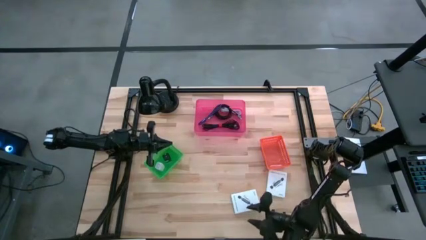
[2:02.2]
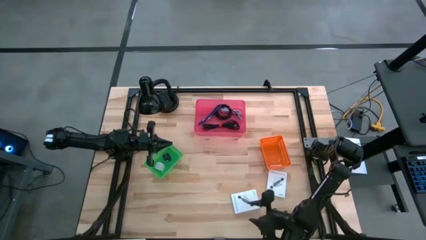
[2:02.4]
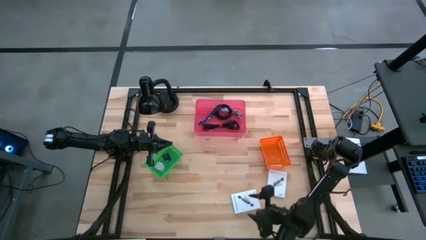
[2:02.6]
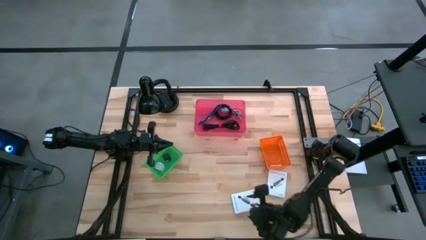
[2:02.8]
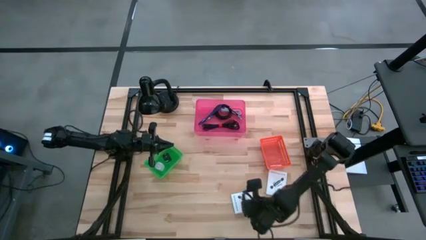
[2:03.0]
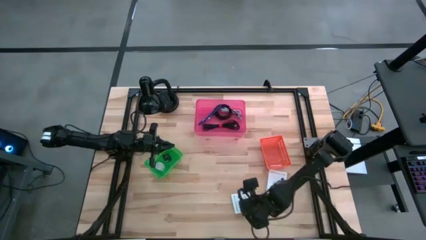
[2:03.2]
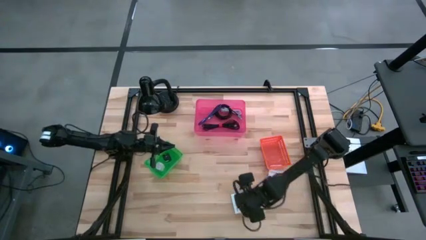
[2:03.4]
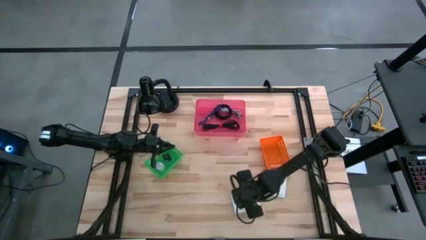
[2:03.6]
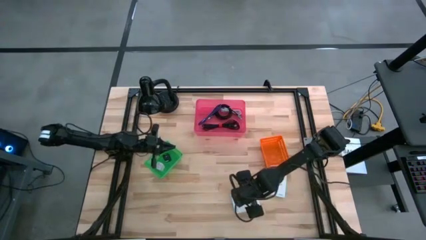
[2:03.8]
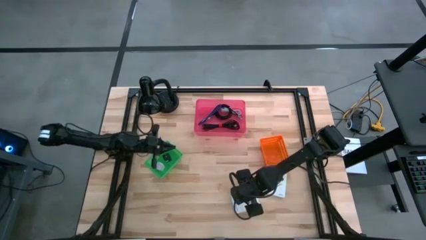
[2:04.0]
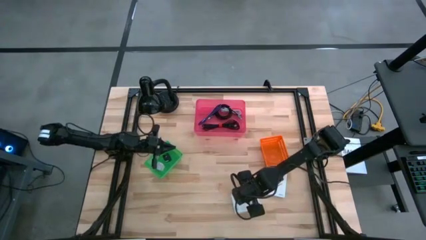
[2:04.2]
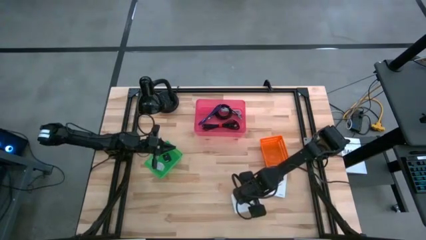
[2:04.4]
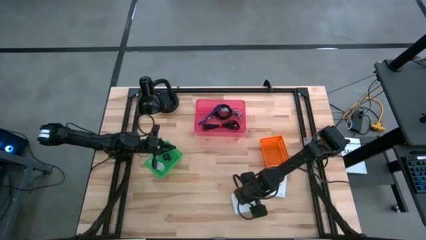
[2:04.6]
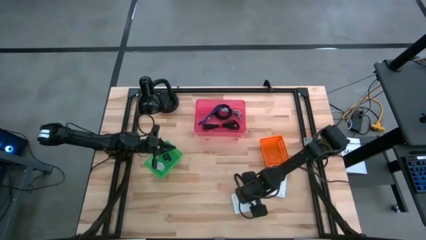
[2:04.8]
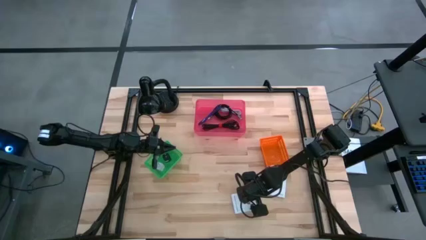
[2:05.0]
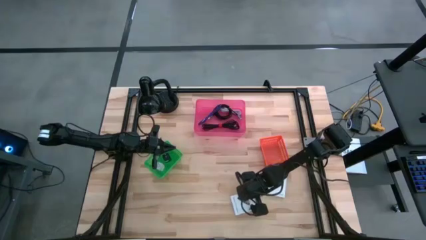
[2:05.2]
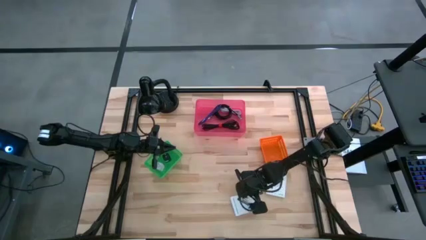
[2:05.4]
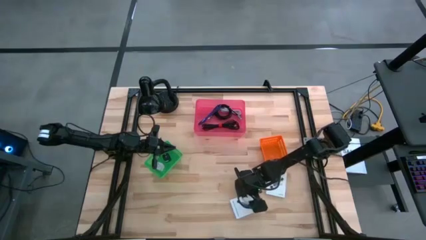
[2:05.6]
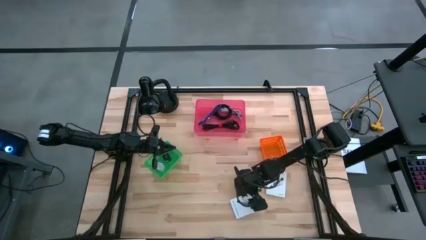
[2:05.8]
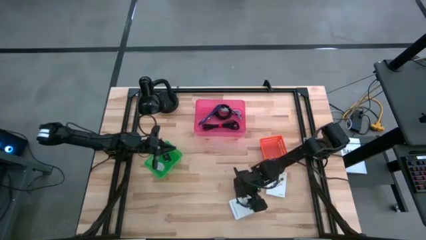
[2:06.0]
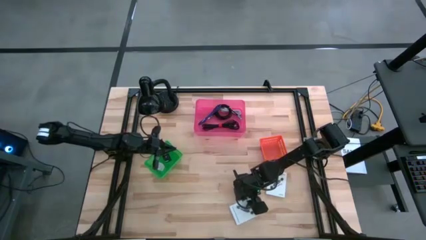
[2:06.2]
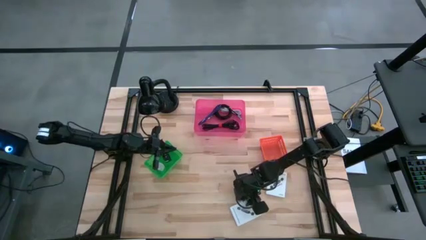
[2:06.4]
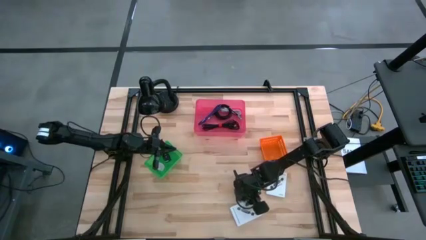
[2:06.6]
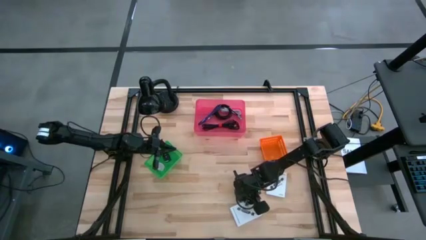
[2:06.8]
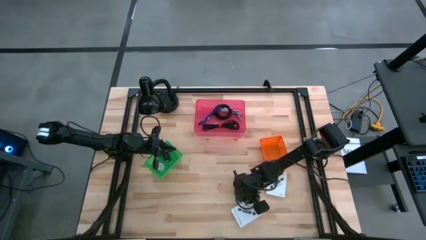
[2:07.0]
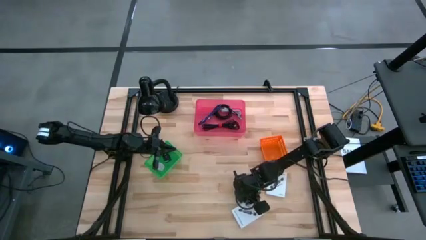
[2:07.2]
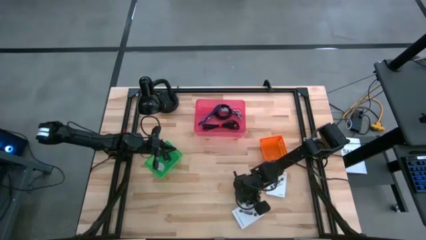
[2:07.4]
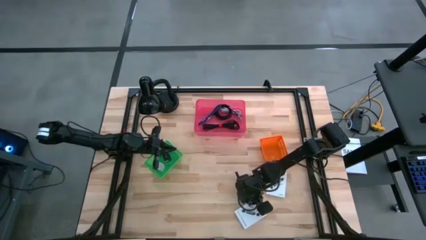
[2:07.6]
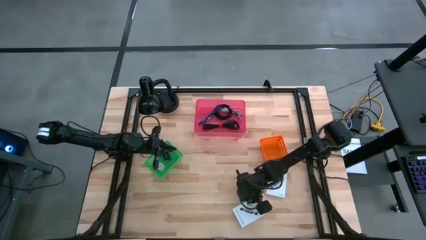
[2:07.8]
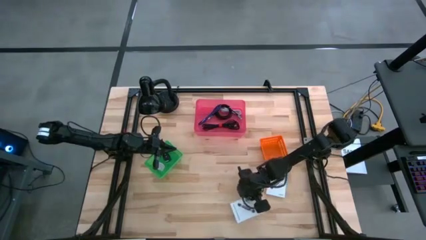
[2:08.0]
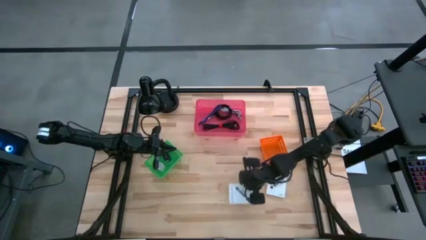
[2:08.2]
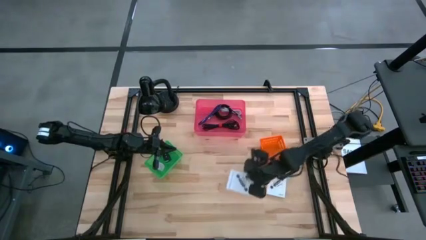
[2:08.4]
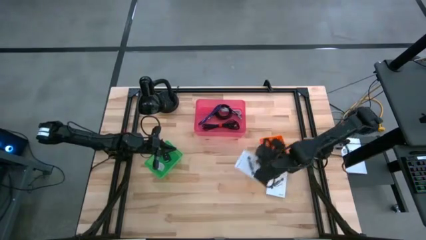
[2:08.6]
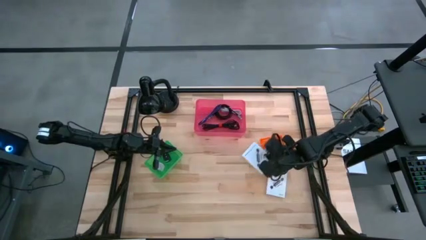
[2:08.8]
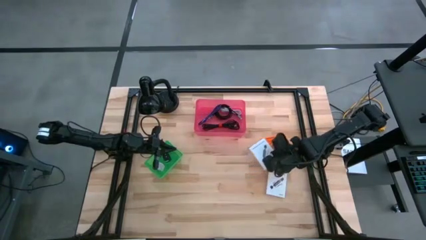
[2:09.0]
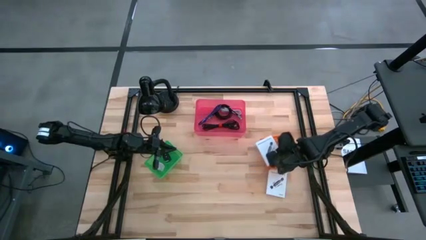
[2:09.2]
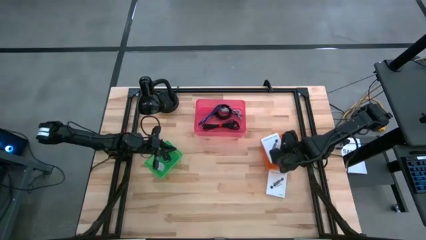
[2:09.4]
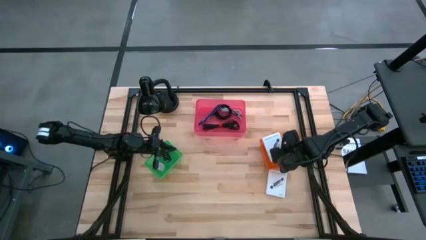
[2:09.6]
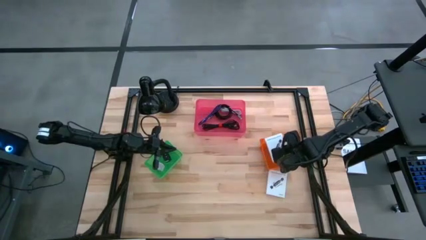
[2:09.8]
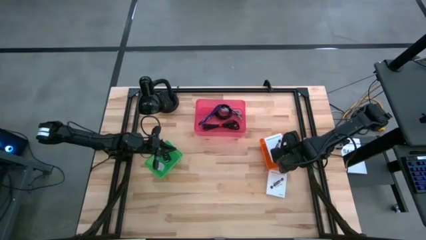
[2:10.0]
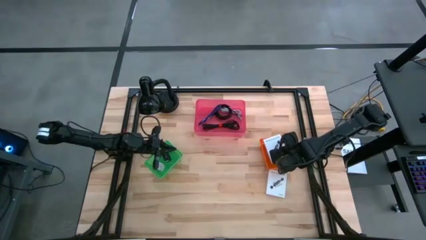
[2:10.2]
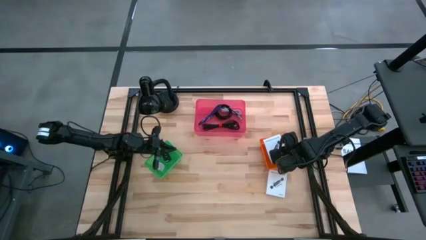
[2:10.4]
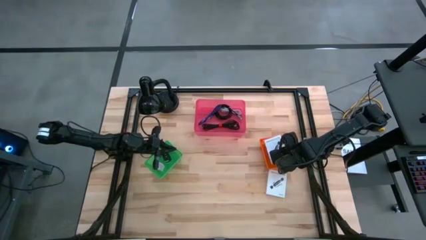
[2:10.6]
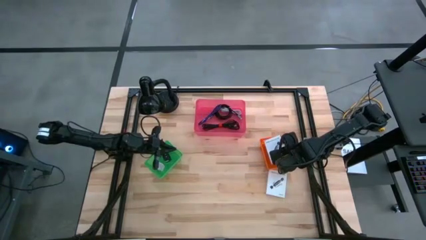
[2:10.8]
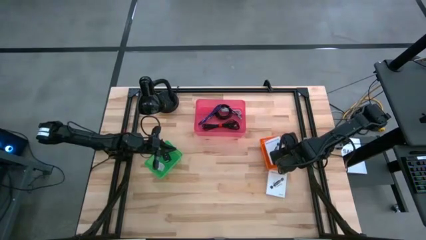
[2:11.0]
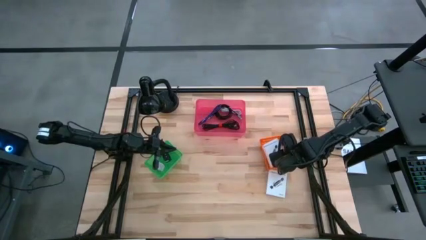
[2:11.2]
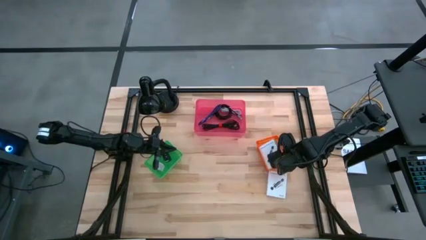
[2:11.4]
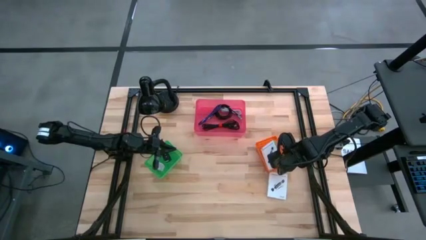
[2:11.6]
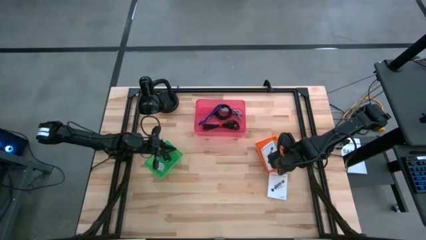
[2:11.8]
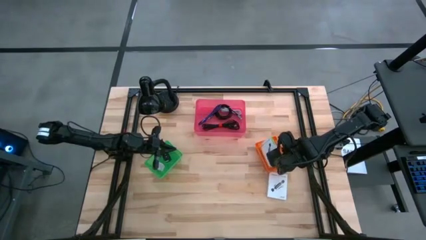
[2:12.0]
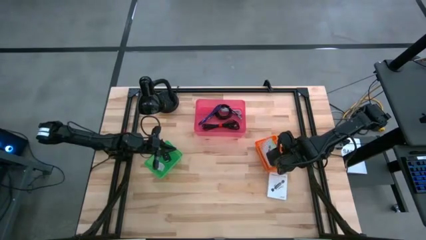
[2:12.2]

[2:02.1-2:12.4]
Task: Pick and place items into bin
Put the bottom card reader box into the orange bin

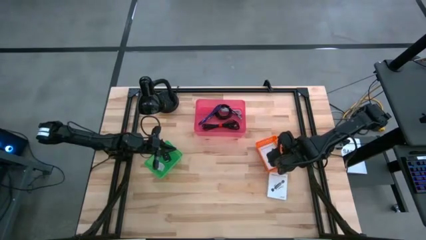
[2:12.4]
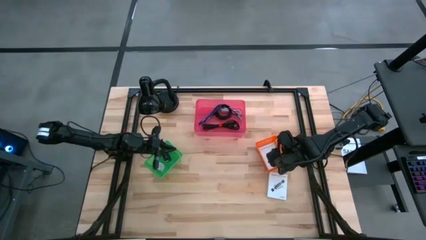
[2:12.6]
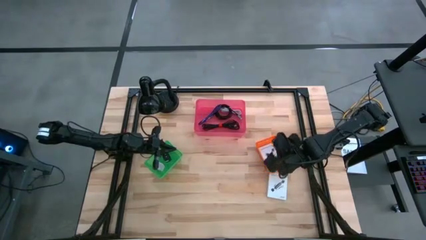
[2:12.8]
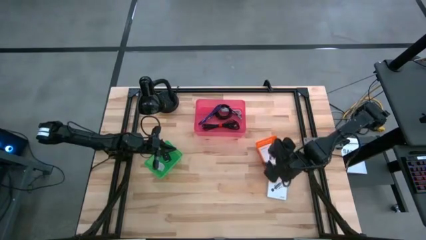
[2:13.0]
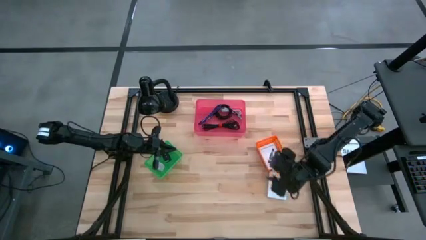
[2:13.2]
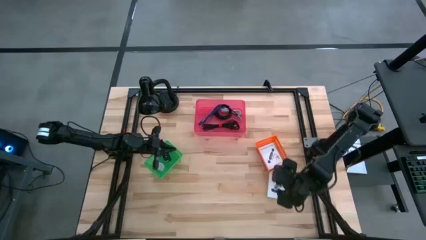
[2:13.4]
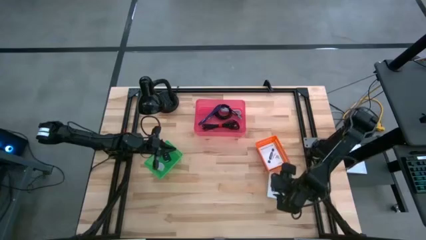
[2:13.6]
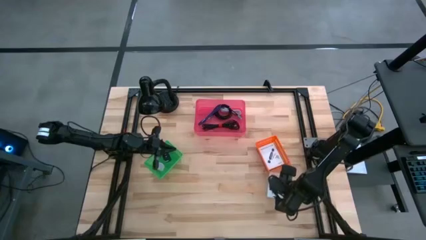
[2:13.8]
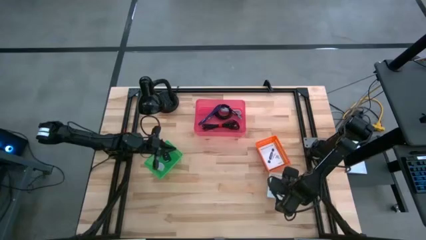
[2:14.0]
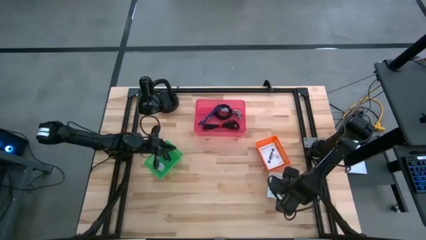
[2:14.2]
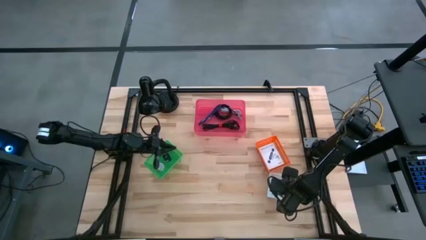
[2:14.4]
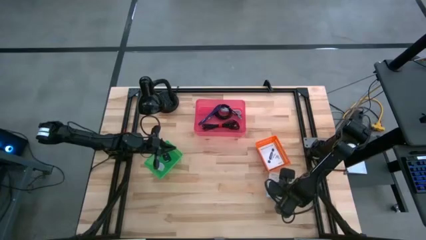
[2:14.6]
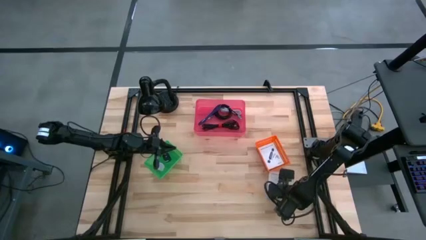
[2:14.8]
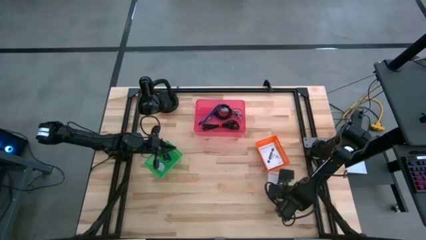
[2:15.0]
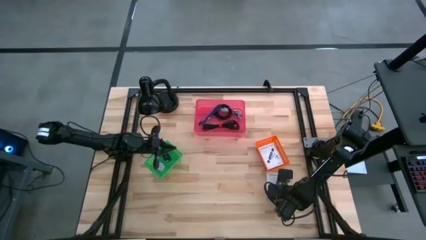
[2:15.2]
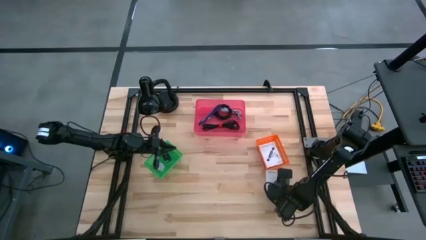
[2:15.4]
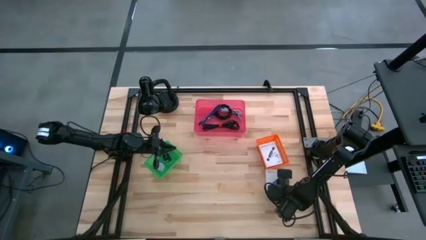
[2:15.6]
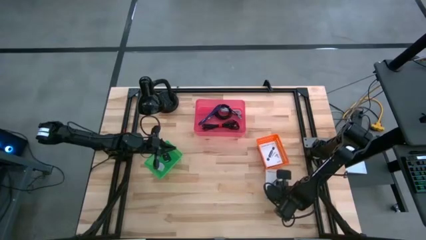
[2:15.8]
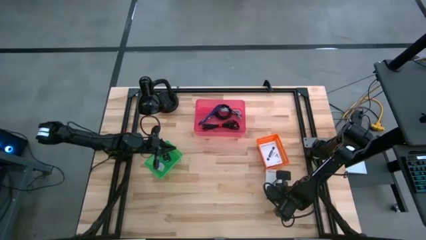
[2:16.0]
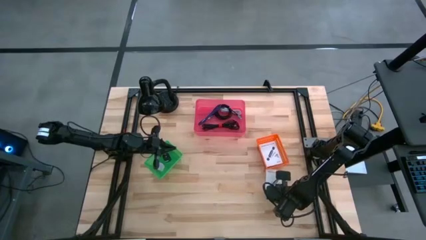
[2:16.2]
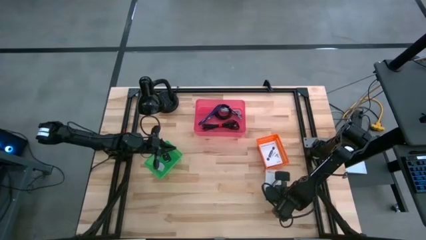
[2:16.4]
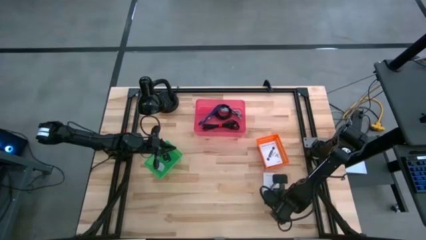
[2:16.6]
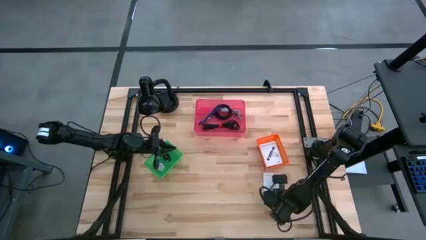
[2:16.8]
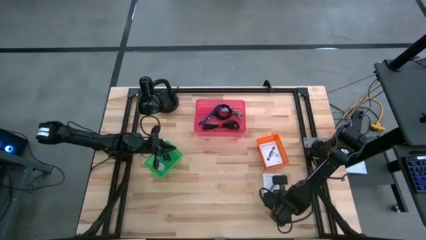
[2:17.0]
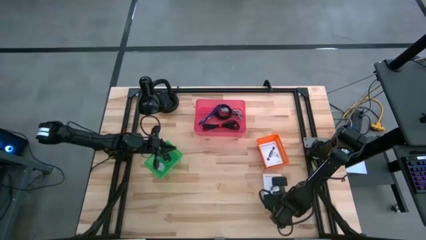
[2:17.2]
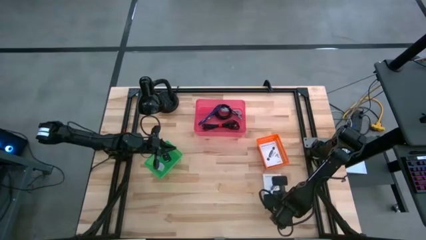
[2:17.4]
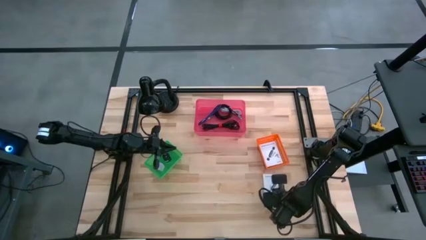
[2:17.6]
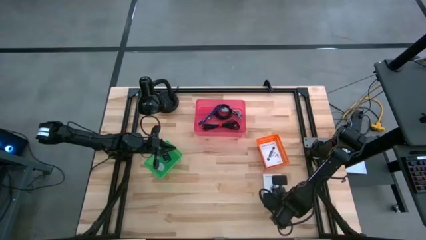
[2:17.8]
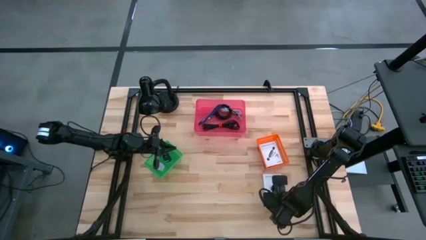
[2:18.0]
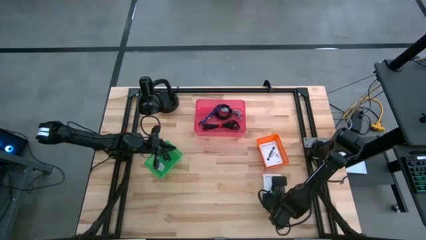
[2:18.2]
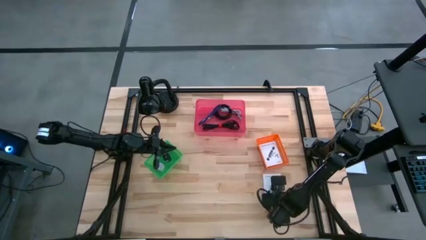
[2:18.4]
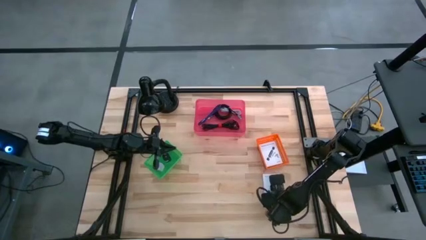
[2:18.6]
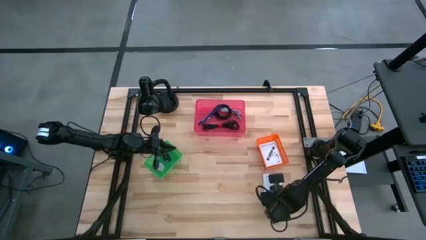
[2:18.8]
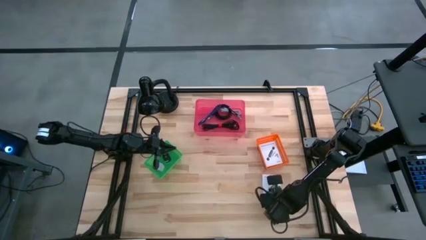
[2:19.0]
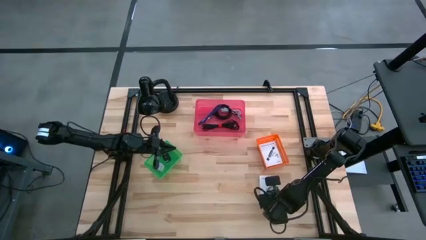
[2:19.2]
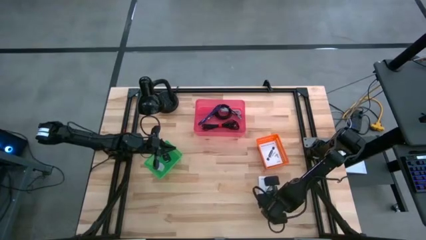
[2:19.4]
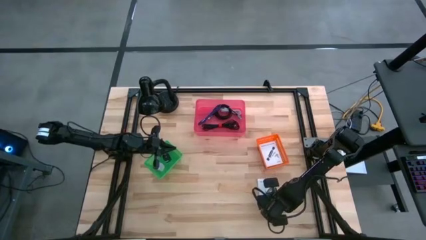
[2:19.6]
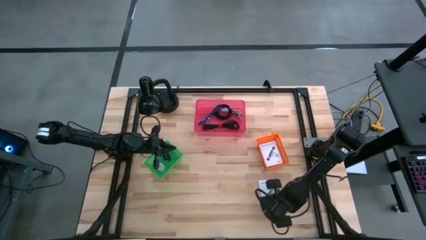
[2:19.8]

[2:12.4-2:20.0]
Put the card reader box into the orange bin
